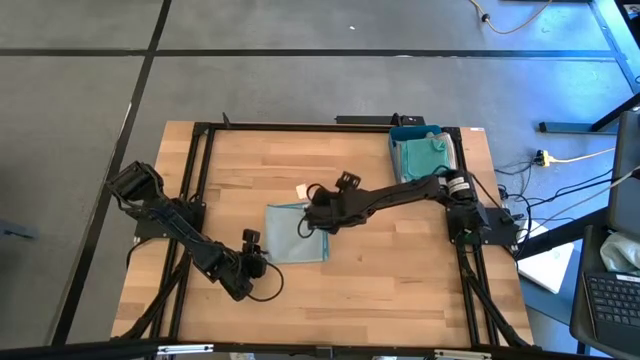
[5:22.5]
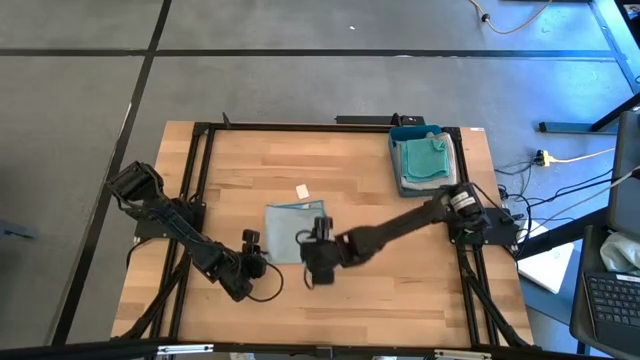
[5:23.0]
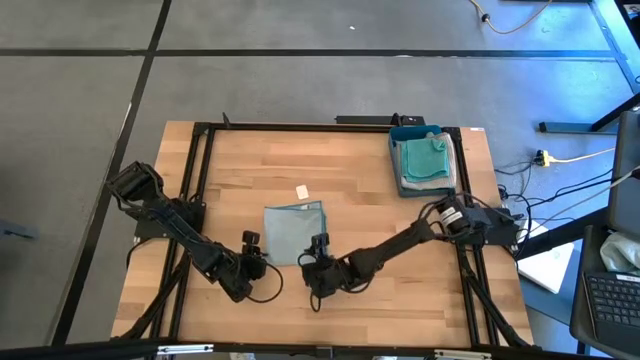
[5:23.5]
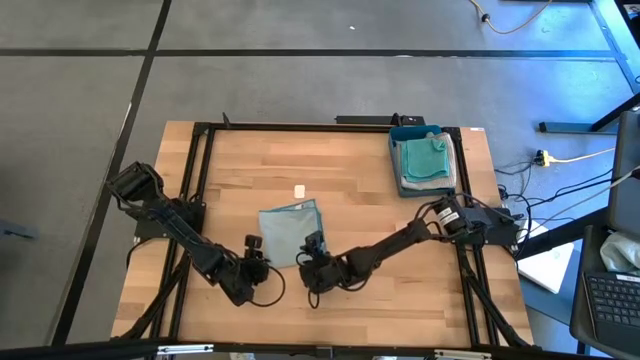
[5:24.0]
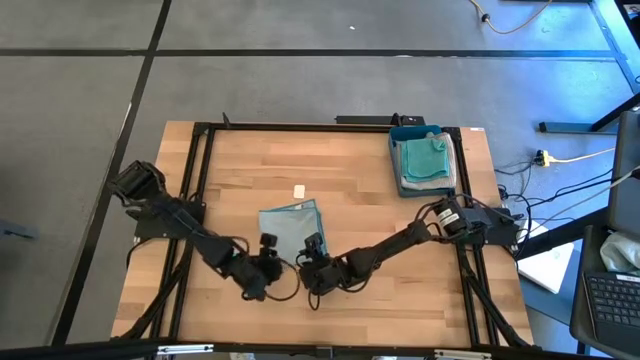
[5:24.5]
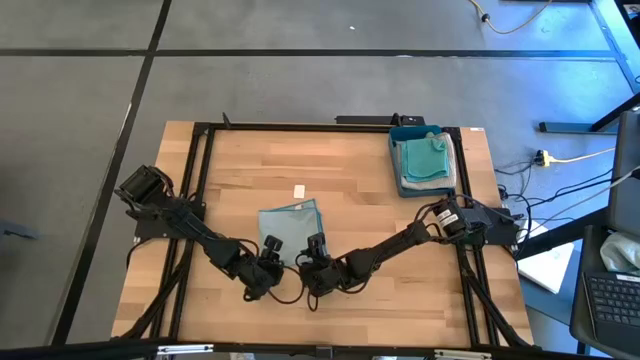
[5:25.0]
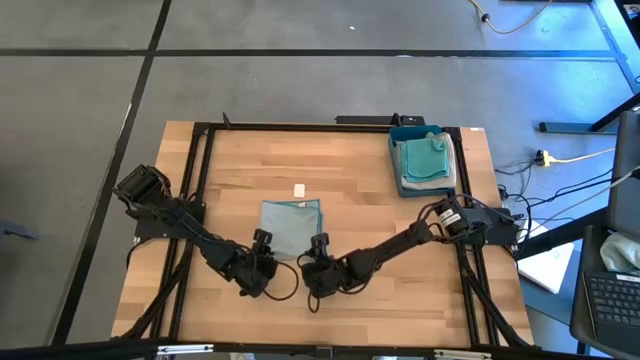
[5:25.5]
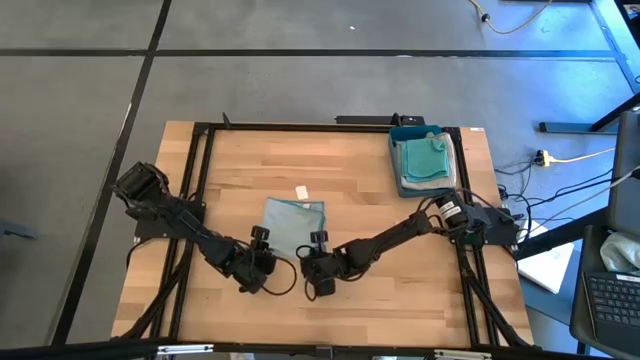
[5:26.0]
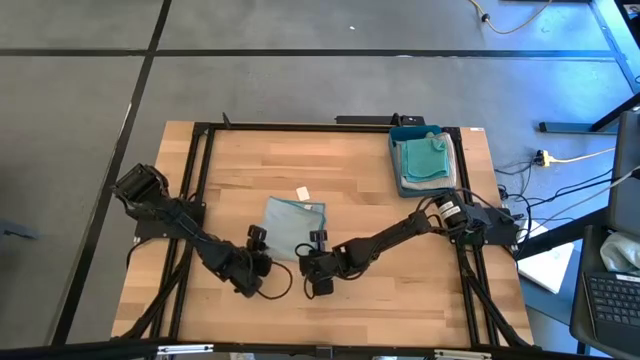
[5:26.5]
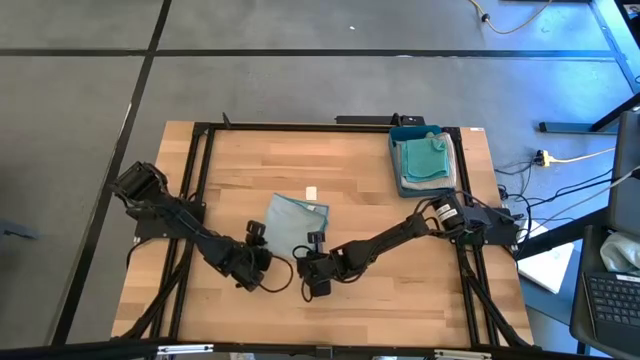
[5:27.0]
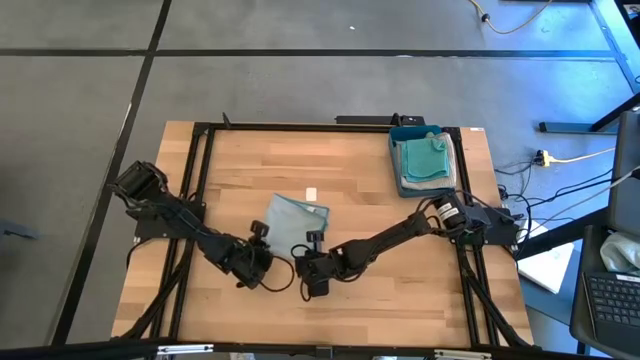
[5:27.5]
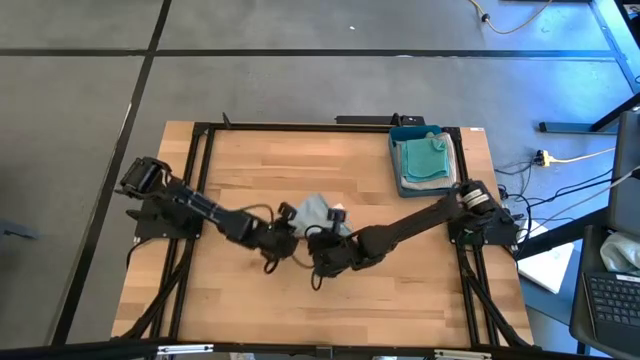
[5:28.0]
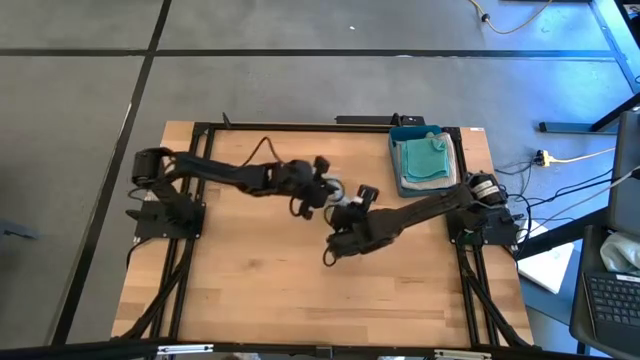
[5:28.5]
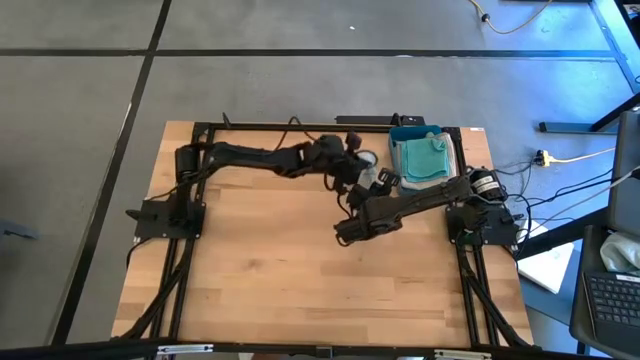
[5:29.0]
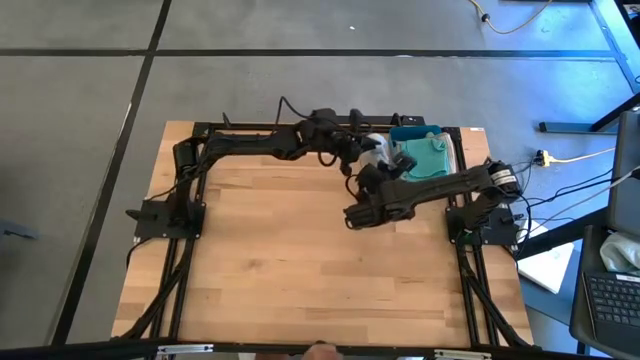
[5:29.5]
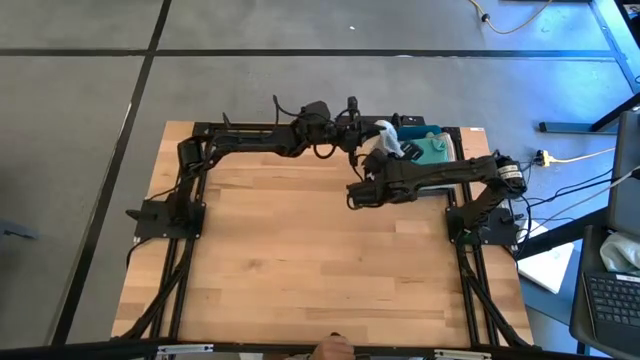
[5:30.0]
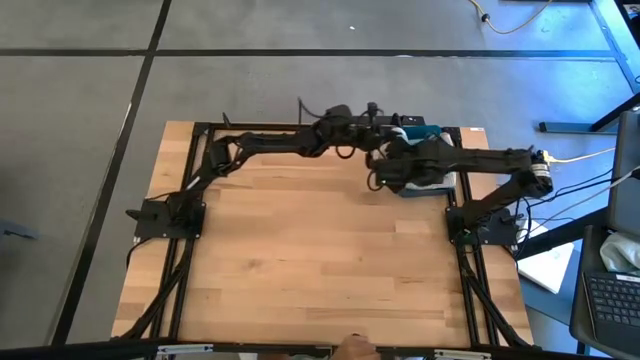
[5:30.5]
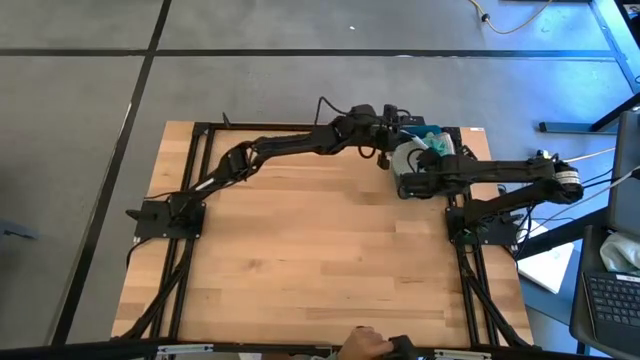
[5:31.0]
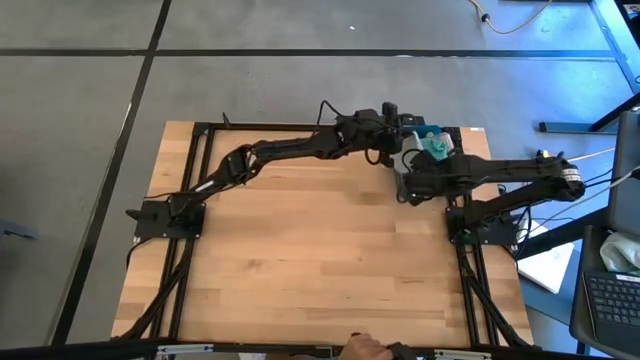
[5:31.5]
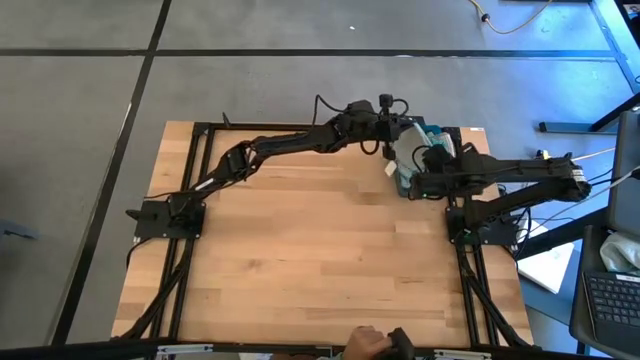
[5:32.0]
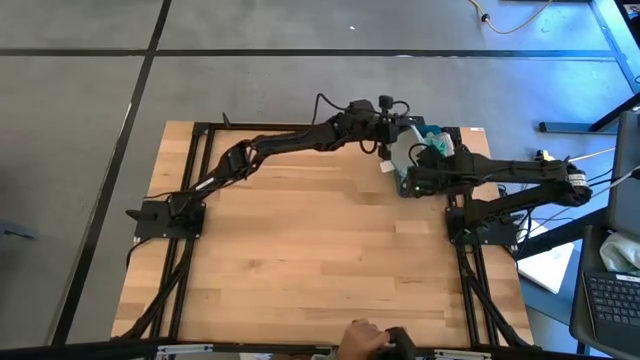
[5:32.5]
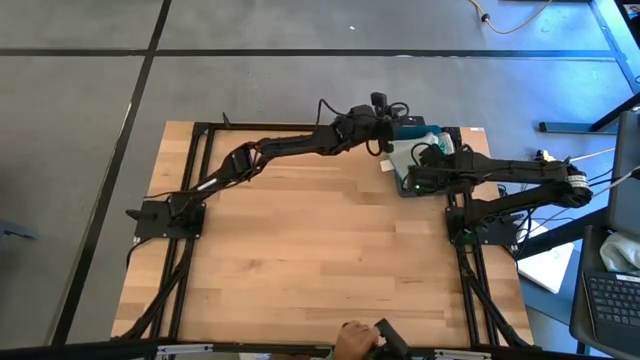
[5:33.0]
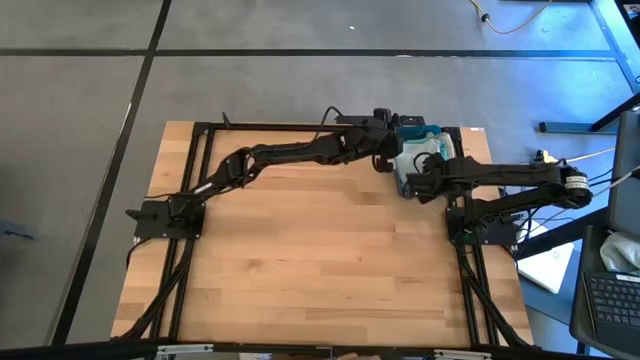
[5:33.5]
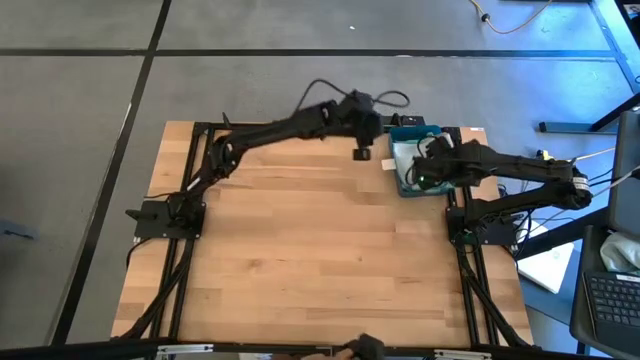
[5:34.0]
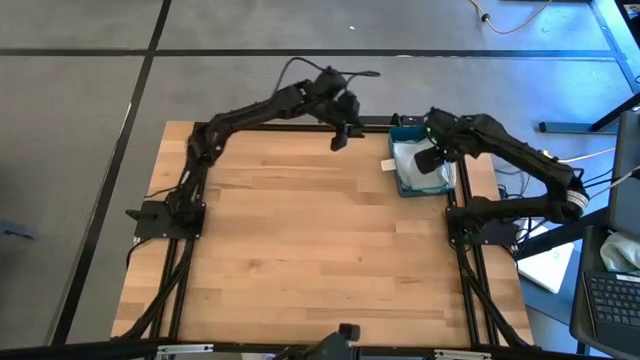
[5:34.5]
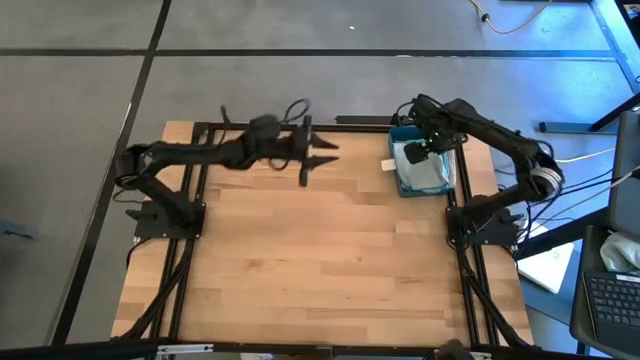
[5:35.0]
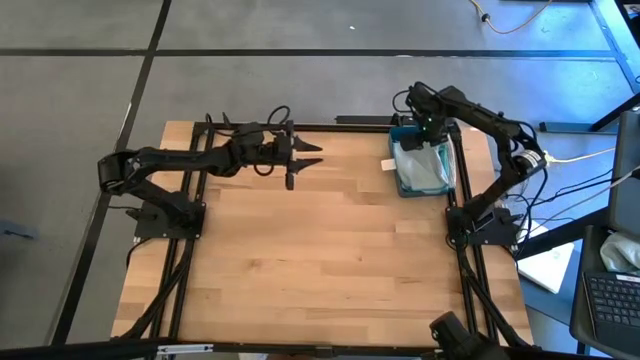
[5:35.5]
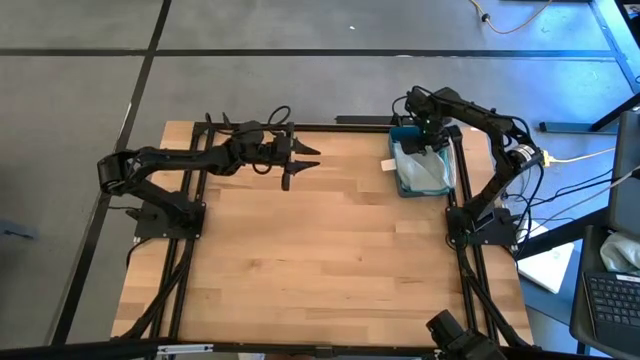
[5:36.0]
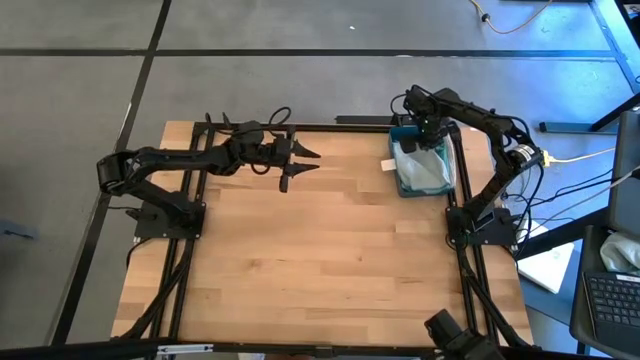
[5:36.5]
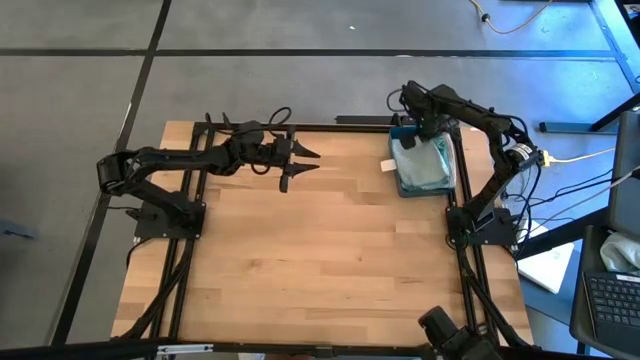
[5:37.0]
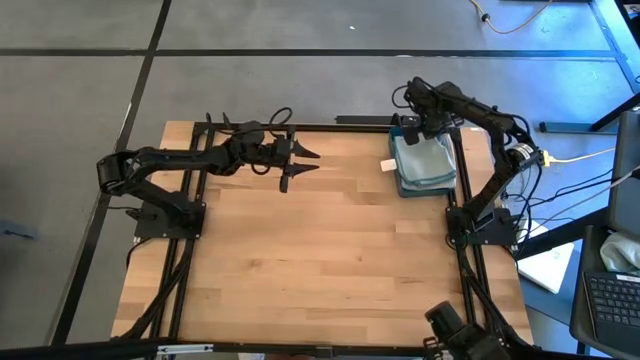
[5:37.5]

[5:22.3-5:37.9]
Task: Fold microfiber towels
Put the light blue microfiber cloth into the blue bin

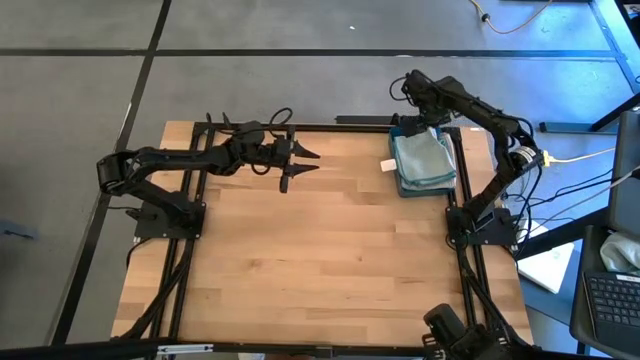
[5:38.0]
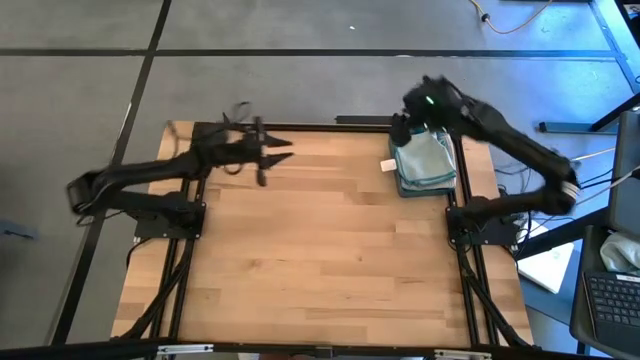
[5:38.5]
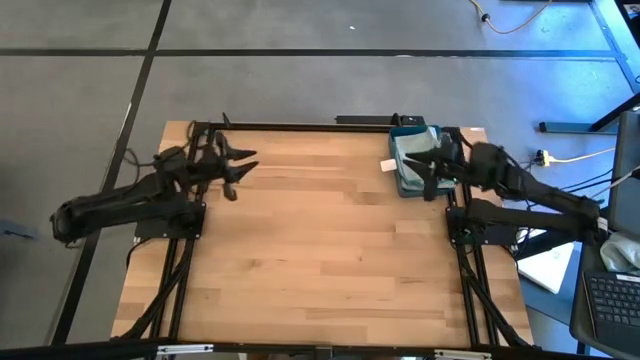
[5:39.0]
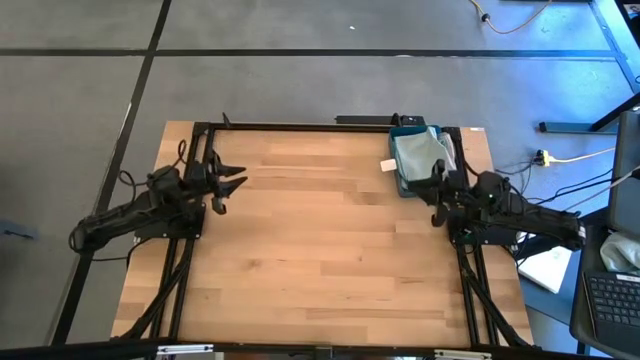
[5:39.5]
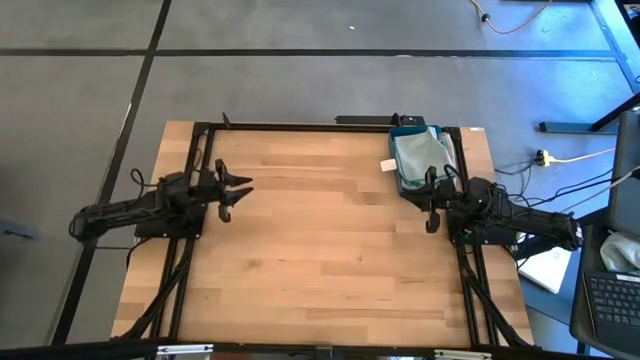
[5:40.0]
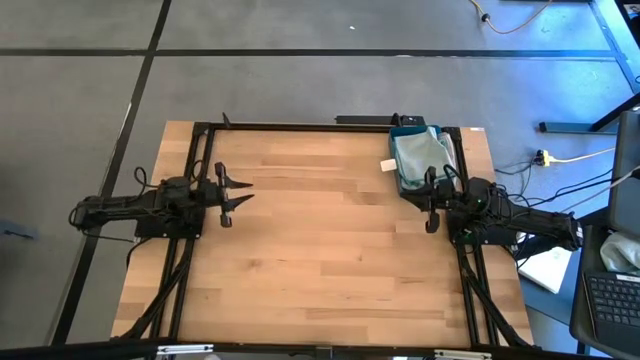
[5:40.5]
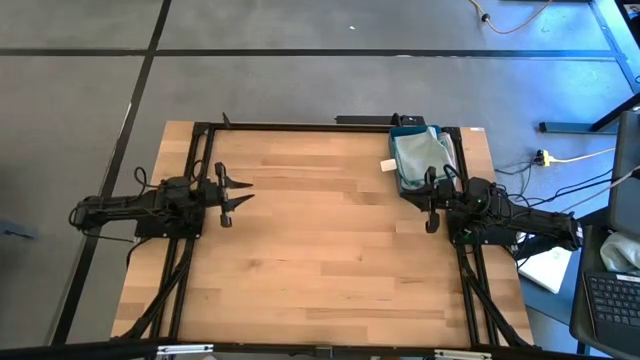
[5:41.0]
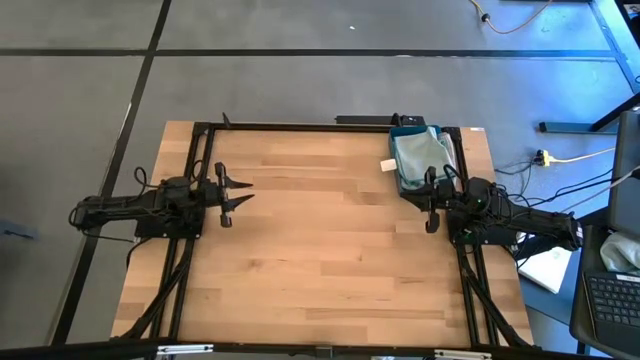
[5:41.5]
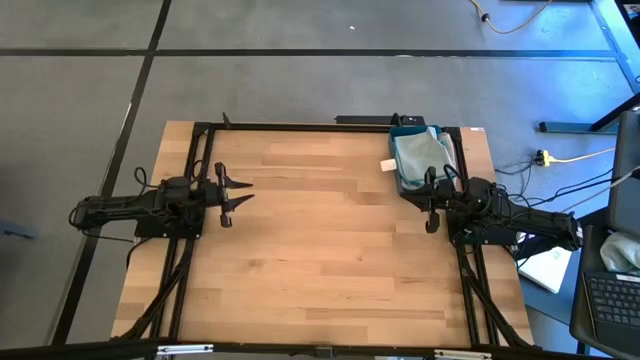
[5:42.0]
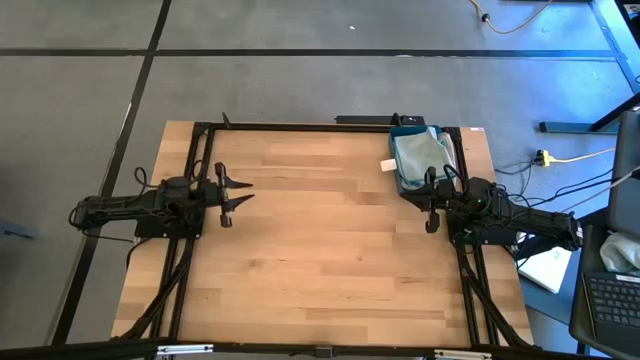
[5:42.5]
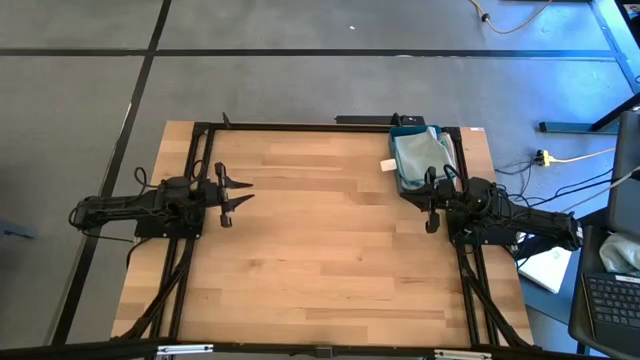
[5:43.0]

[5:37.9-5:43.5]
Return to Home Position
